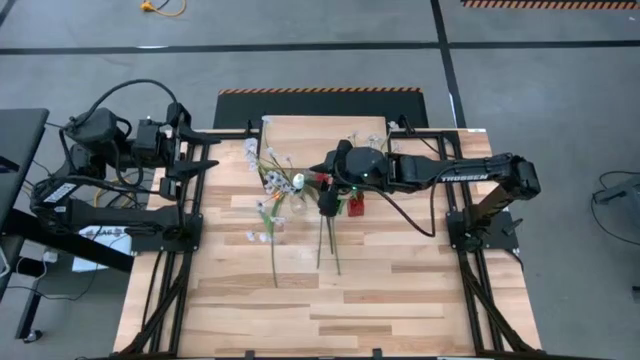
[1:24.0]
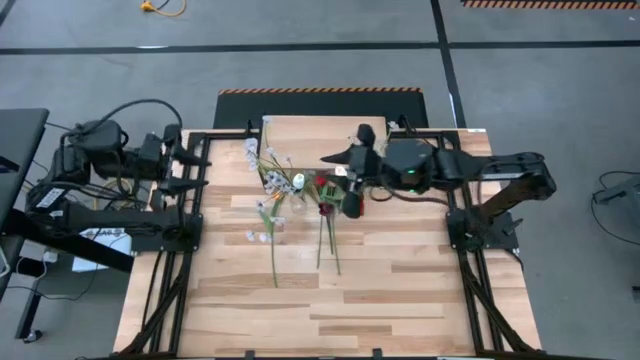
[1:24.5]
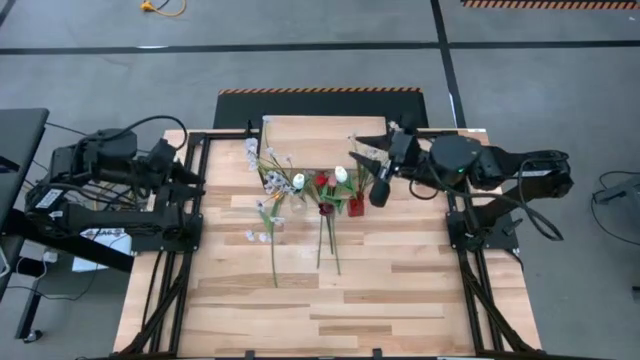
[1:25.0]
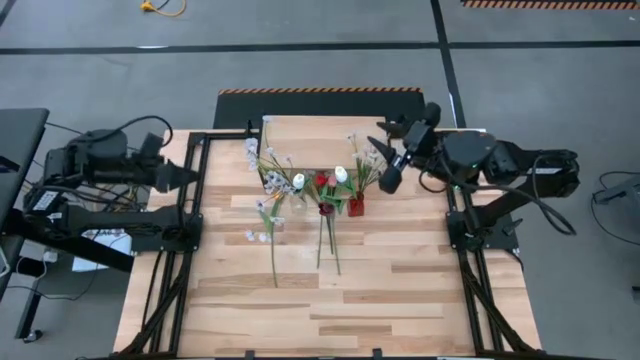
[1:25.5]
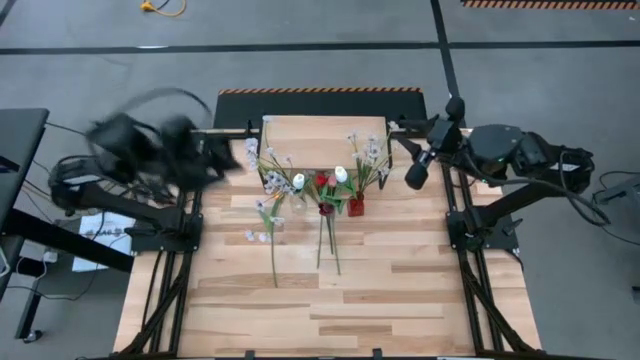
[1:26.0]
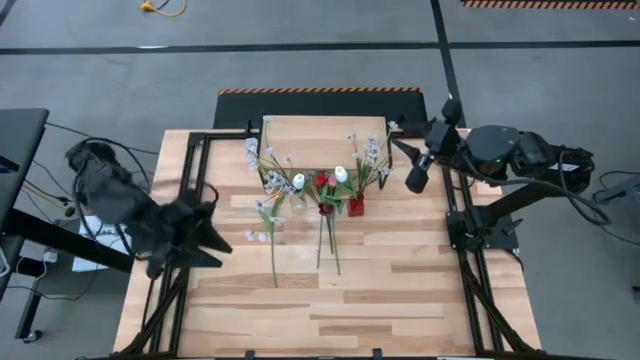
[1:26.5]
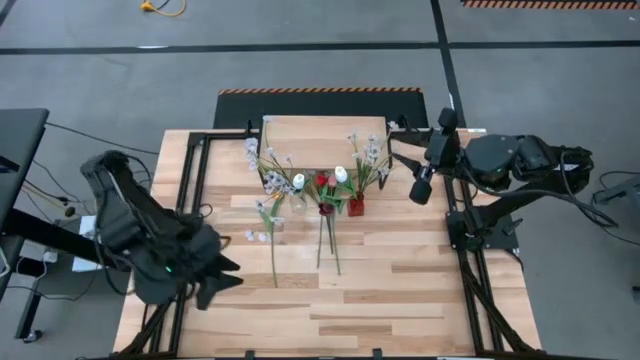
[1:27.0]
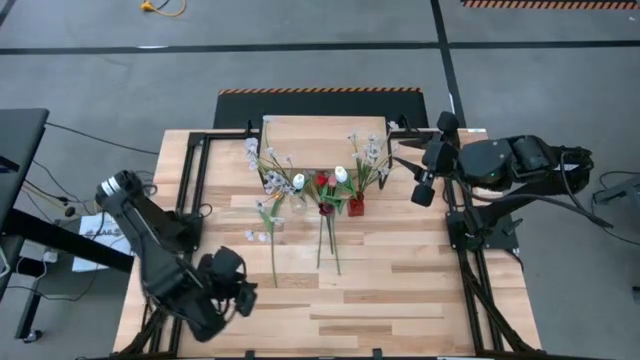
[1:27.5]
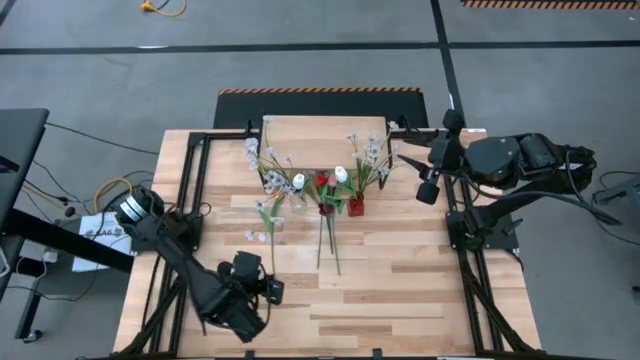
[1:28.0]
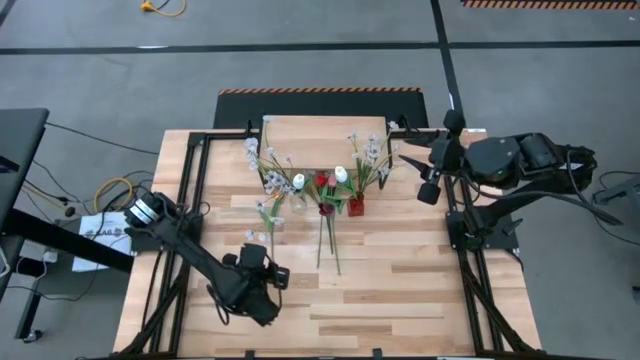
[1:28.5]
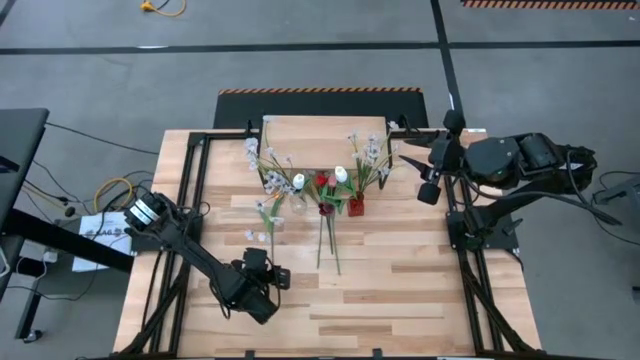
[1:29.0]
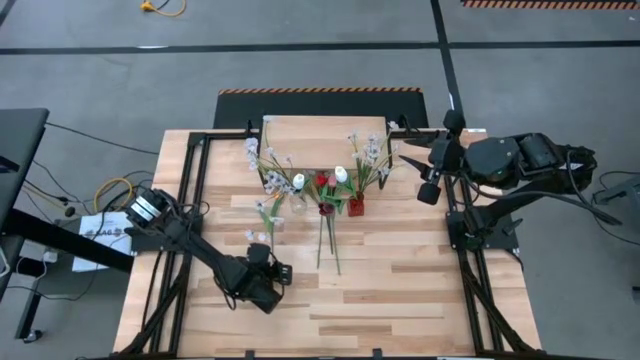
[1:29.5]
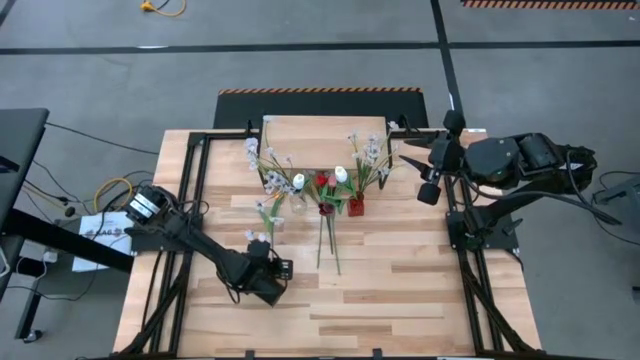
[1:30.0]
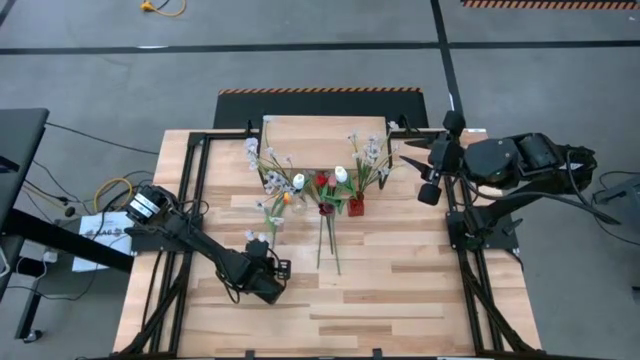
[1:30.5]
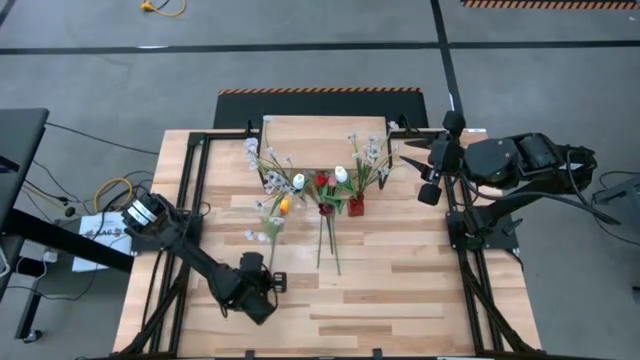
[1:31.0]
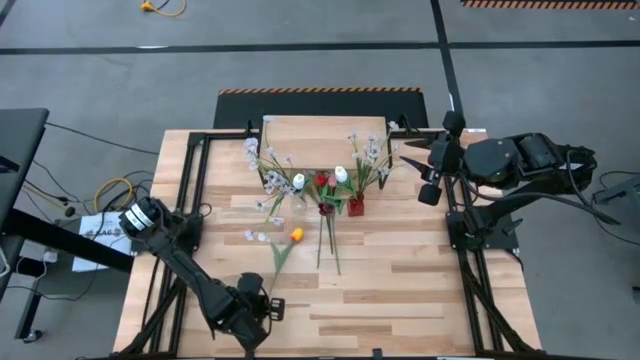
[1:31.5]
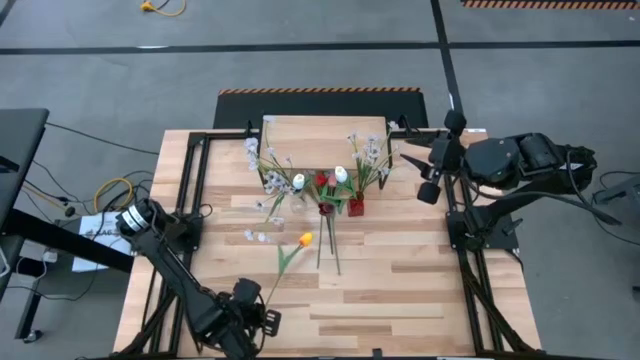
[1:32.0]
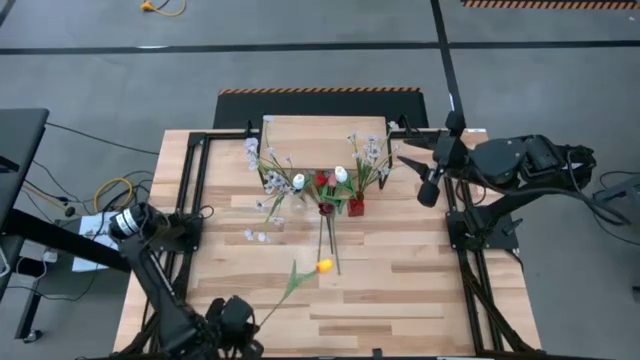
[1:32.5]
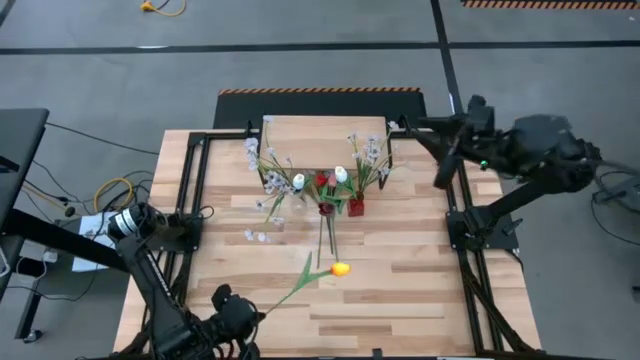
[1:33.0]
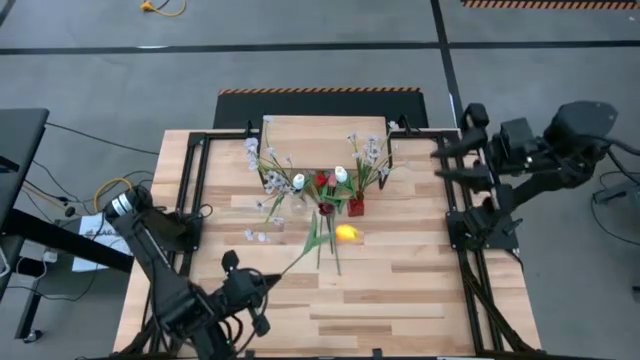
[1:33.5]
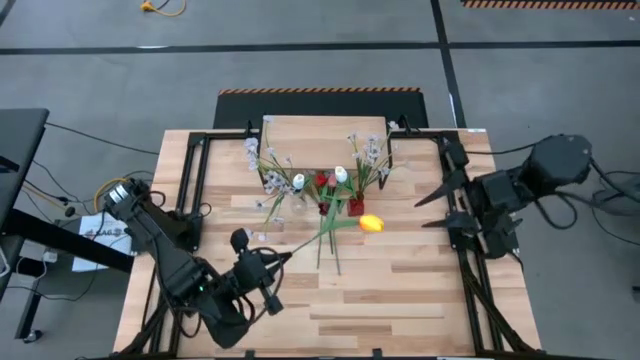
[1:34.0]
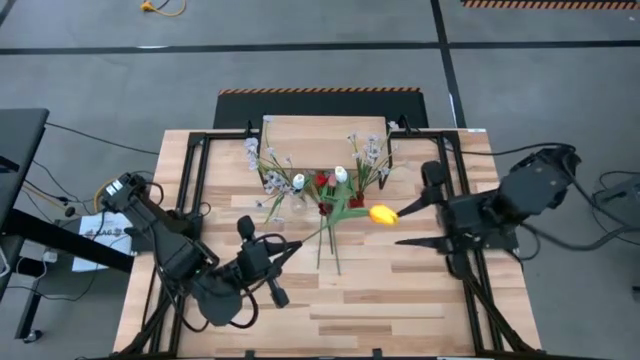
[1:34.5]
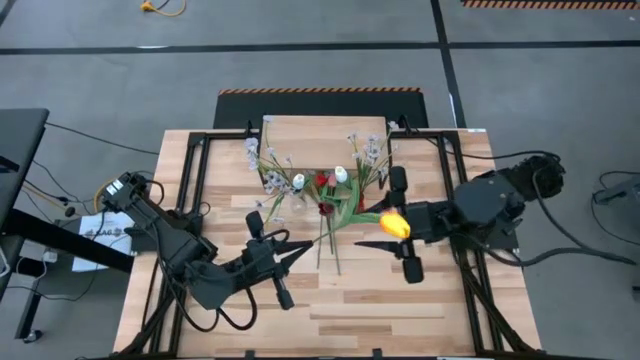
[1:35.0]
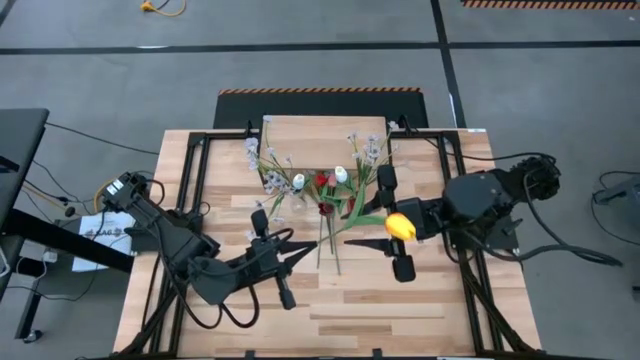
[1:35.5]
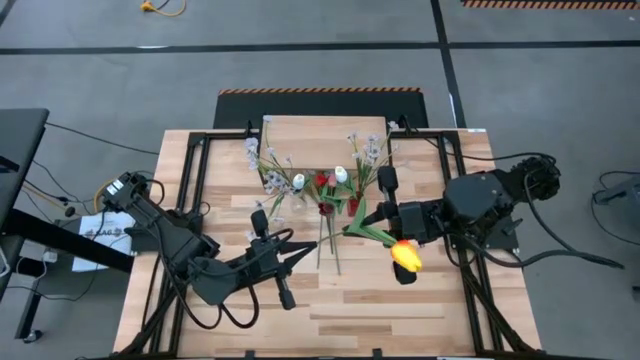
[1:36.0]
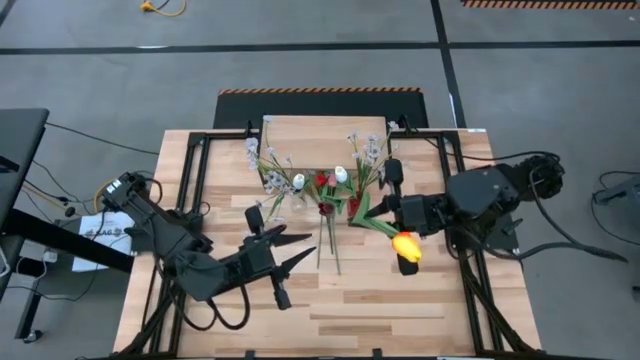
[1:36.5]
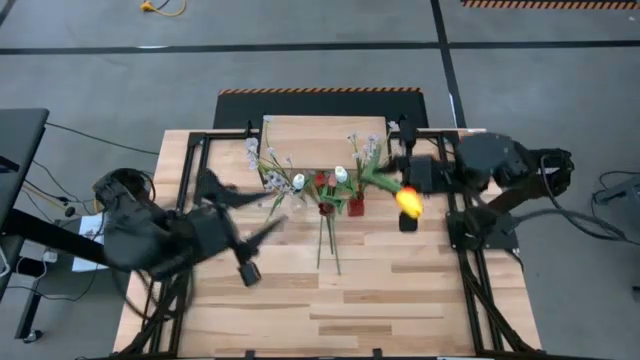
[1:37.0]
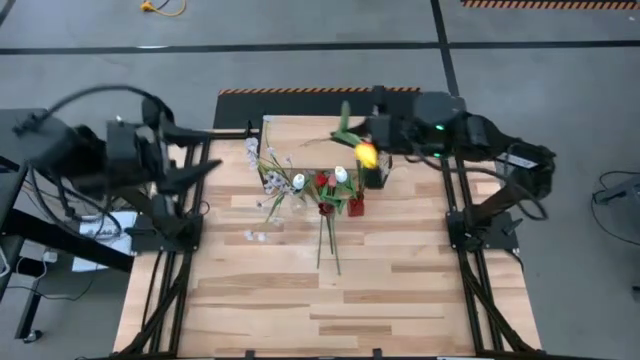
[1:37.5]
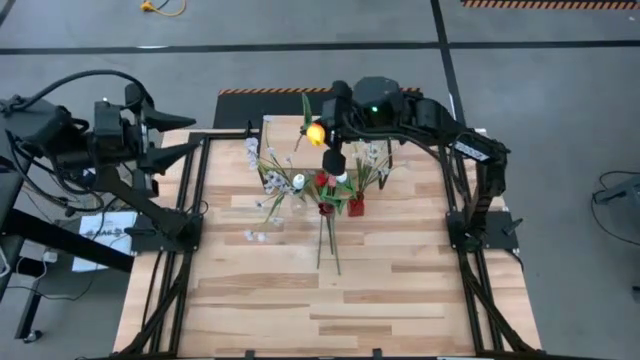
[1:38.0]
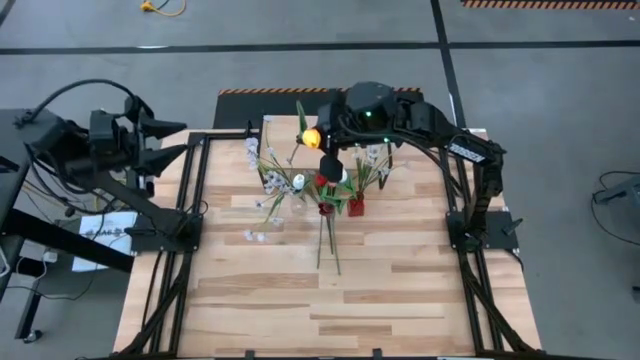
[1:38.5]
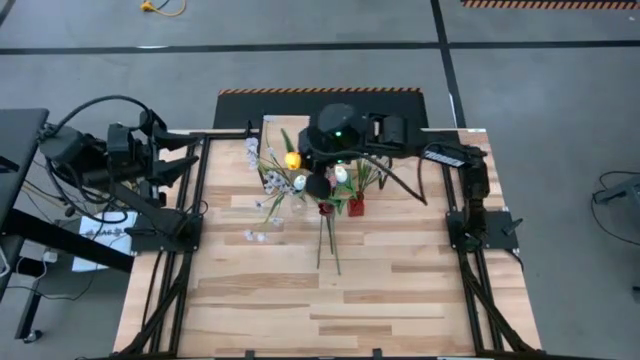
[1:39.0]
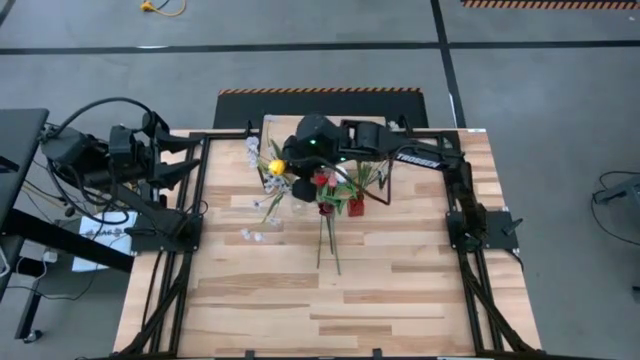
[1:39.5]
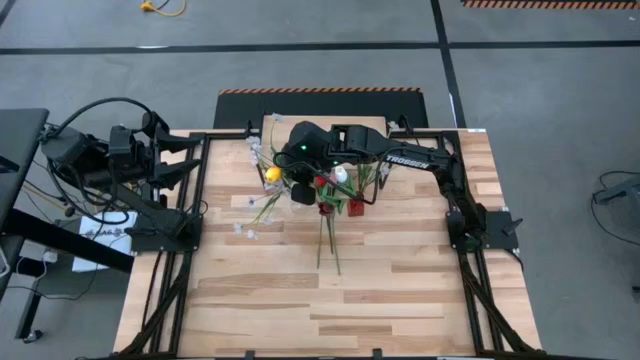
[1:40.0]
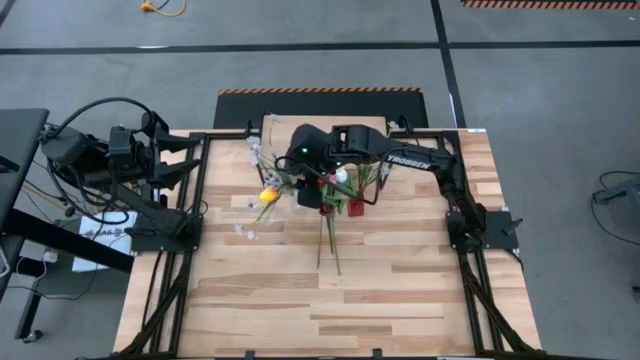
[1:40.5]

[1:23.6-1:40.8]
Task: Pick and place flowers into a vace then onto a shelf
Put the yellow flower into the transparent vase

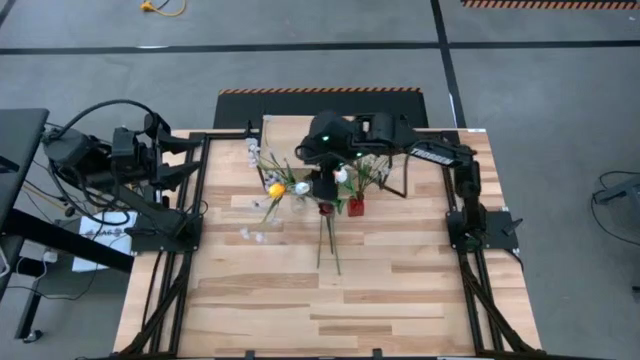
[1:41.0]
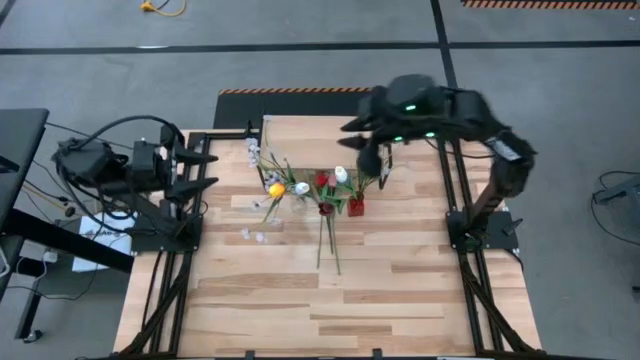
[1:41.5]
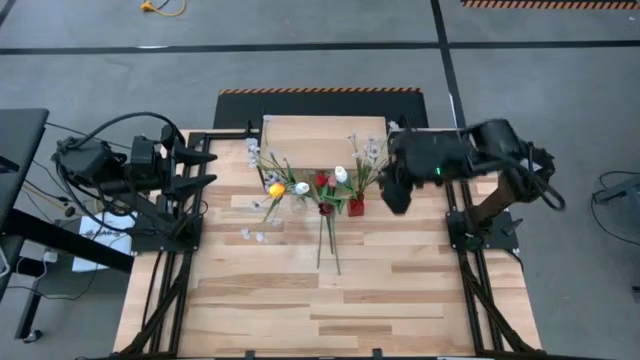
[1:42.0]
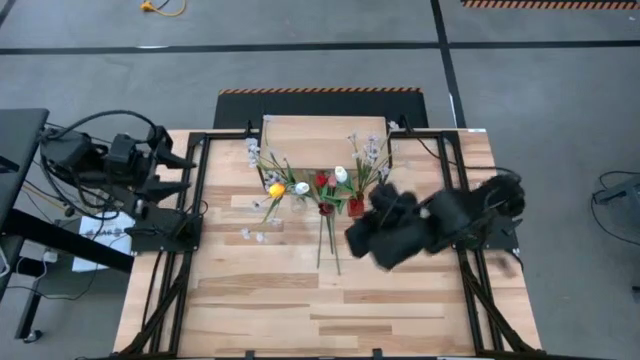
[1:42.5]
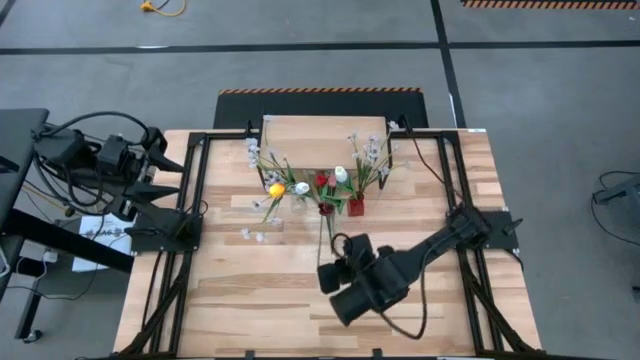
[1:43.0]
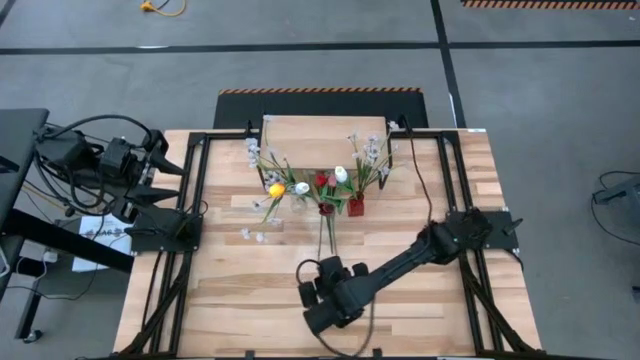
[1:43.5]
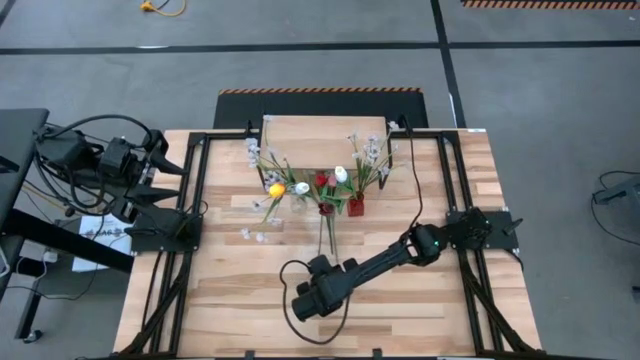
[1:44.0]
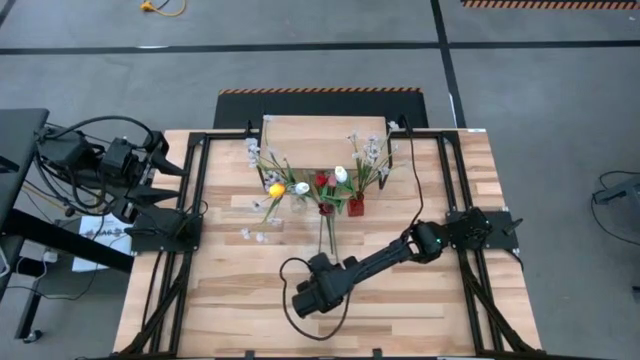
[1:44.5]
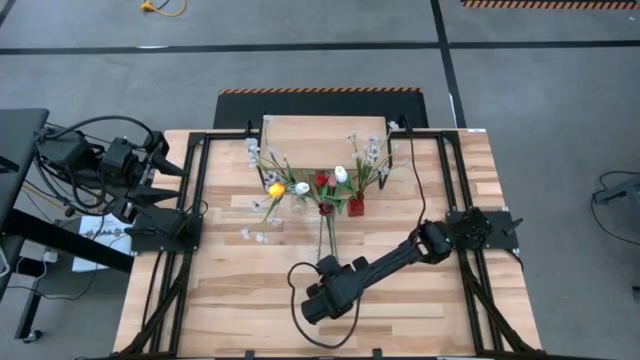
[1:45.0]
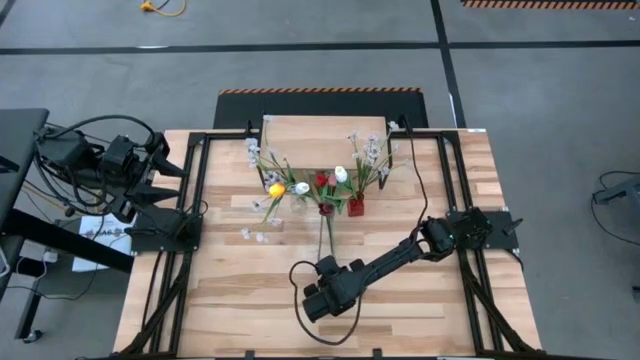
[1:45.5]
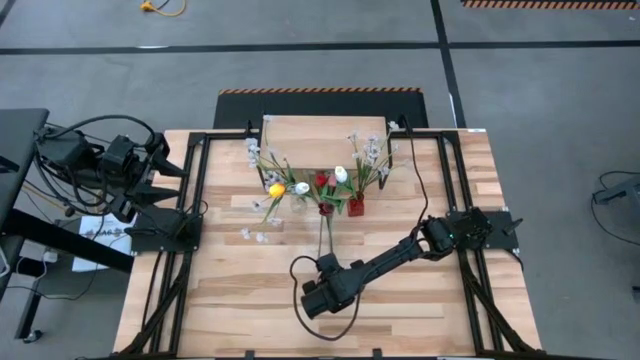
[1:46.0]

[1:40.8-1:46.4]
Put the pink flower into the red vase
